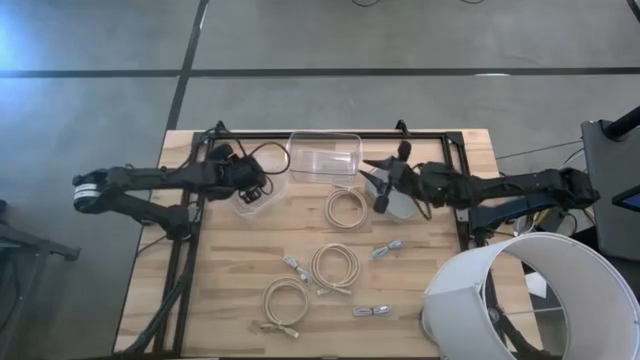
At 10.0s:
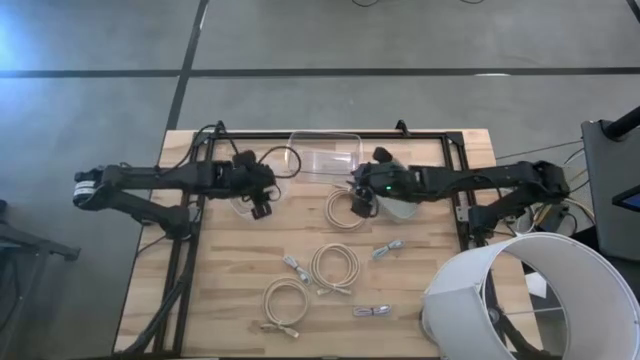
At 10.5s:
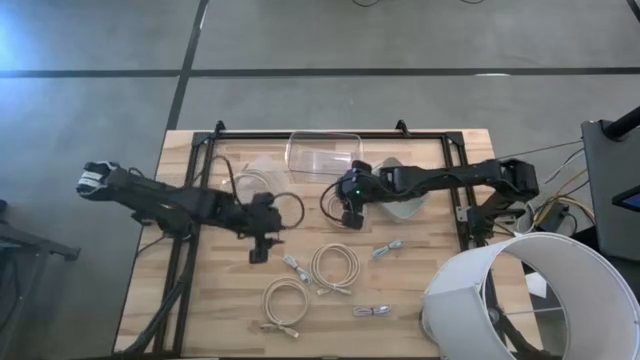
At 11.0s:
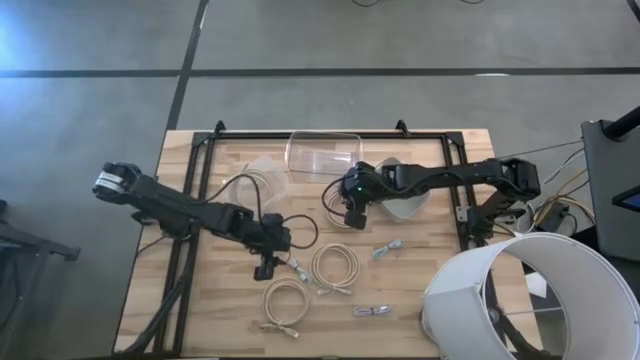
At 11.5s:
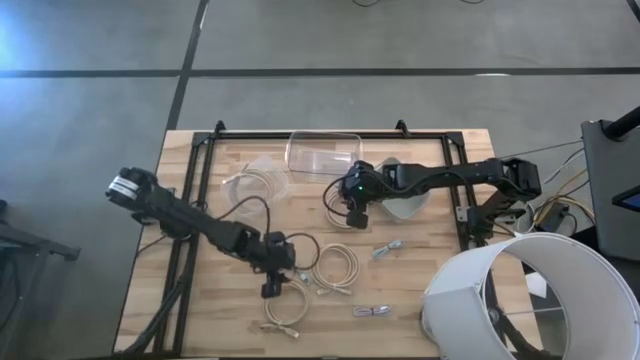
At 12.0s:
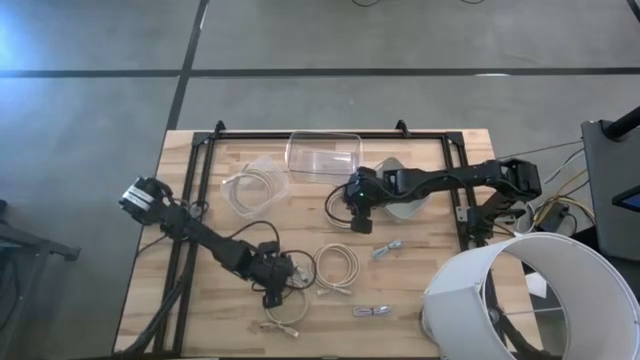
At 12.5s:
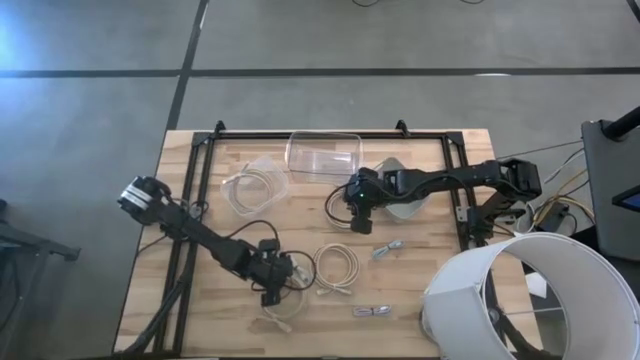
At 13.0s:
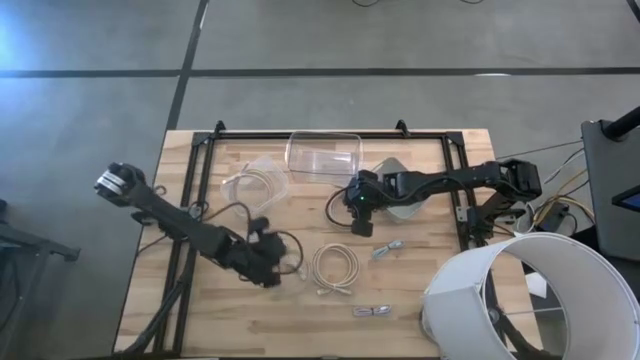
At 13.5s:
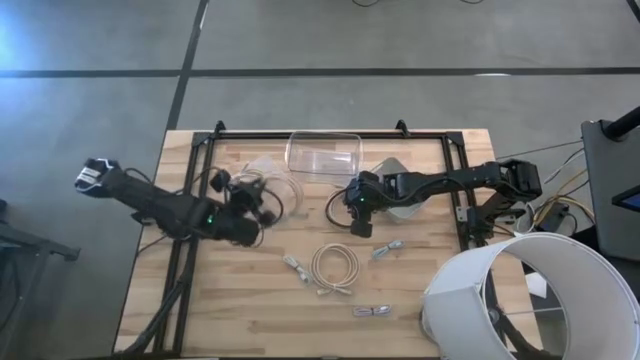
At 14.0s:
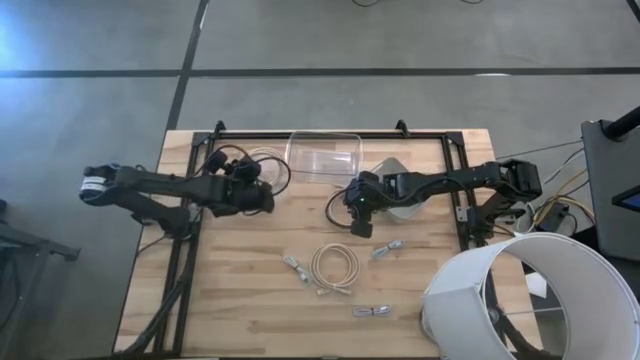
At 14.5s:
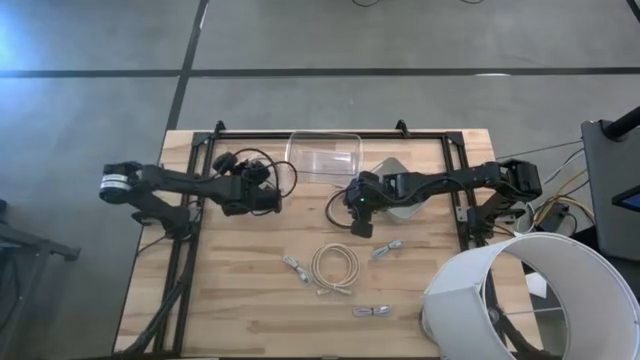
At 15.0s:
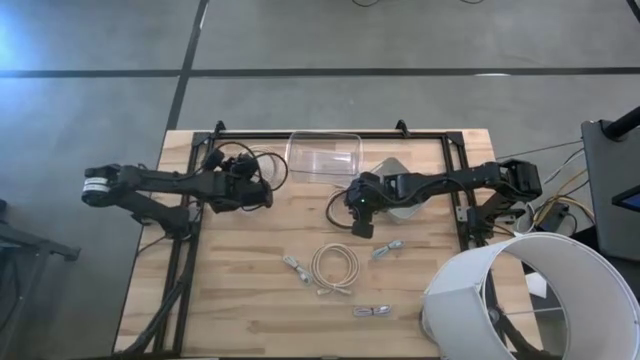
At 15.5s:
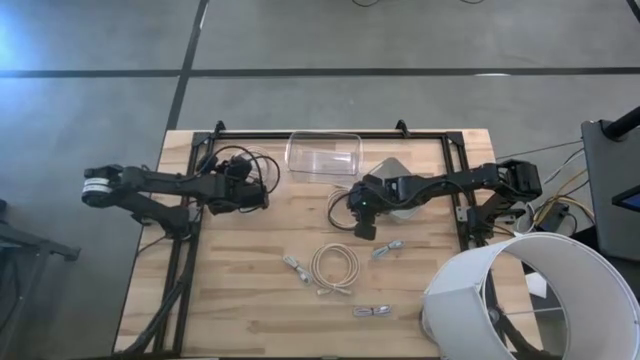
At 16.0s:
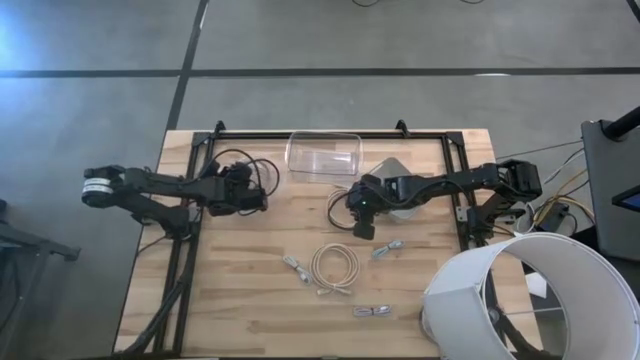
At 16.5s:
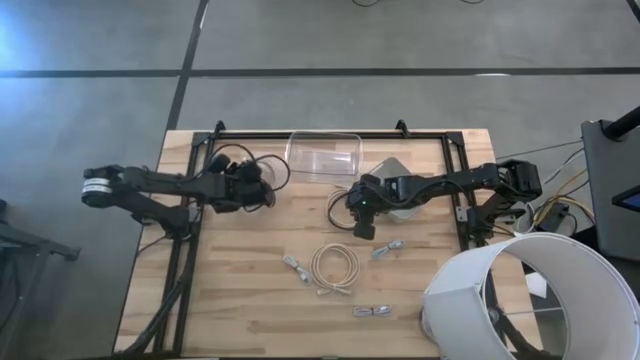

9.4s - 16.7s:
Task: Pick & Place USB Port
Put the brown HDMI cable into the left transparent bin

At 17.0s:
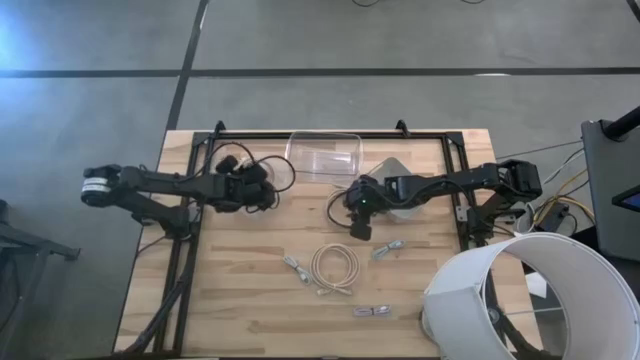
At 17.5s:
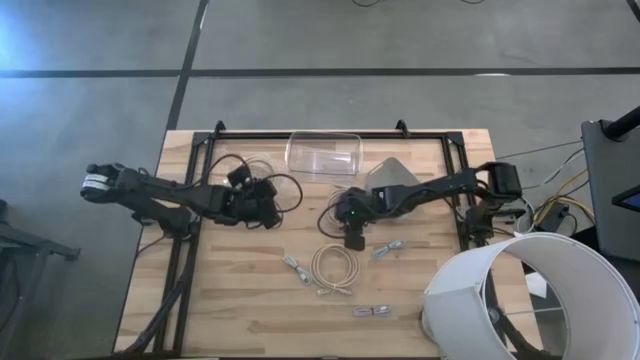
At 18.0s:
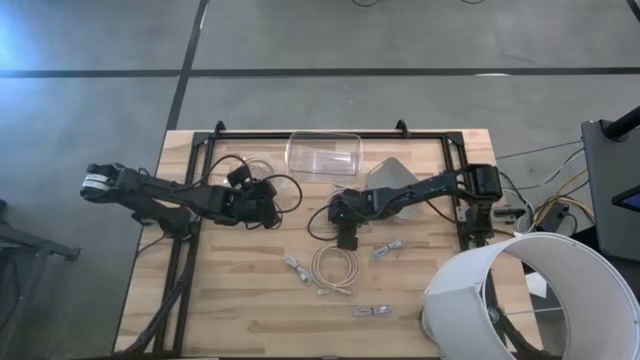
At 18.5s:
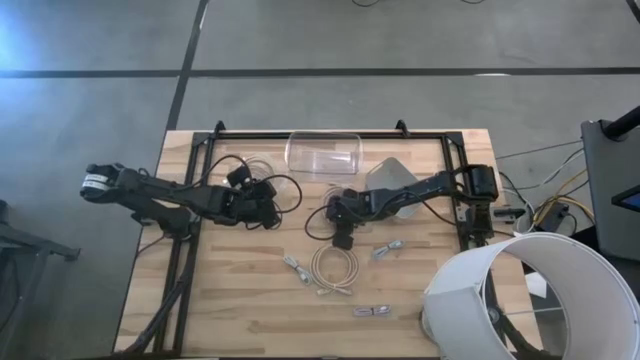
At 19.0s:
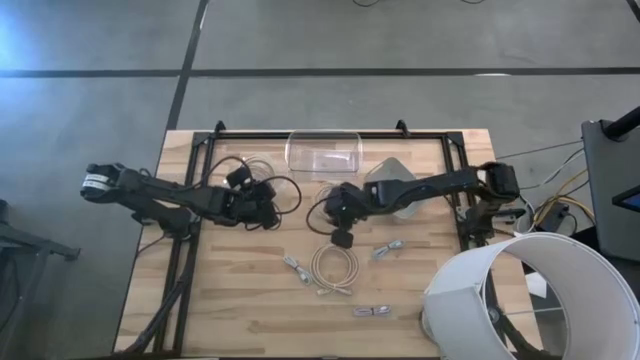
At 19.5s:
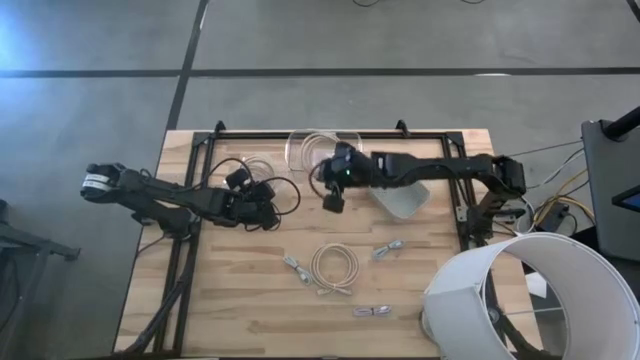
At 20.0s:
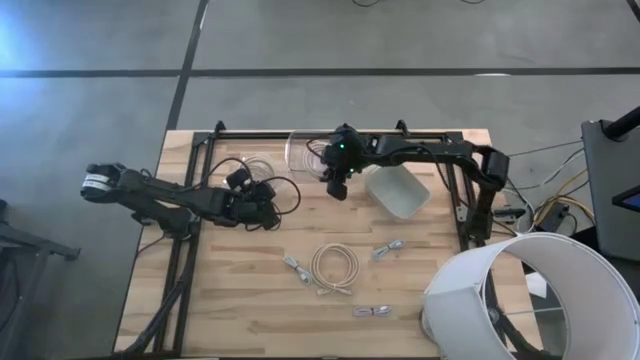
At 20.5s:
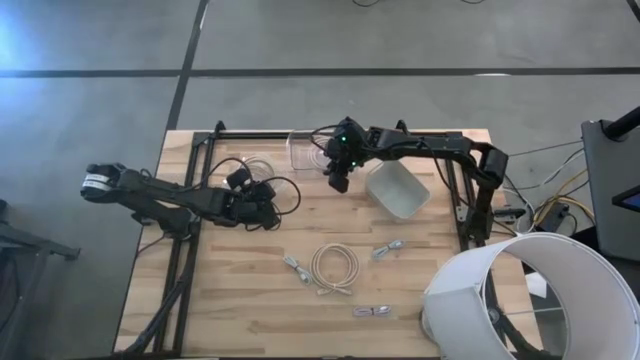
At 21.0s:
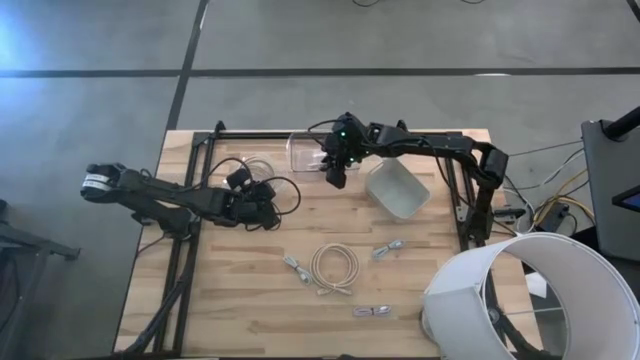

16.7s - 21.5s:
Put the brown HDMI cable into the right transparent bin

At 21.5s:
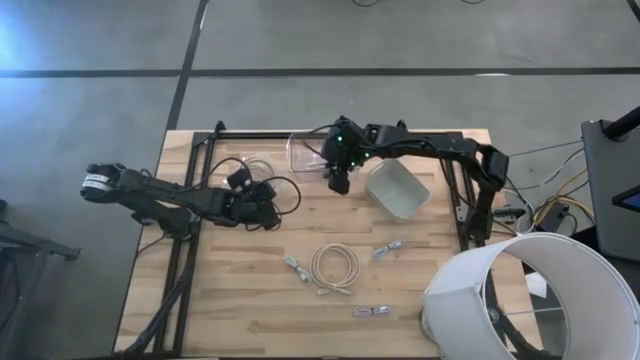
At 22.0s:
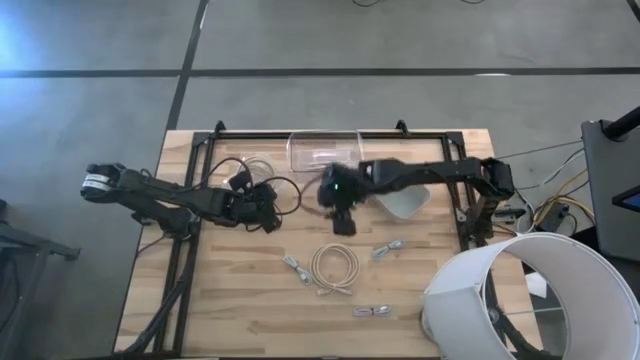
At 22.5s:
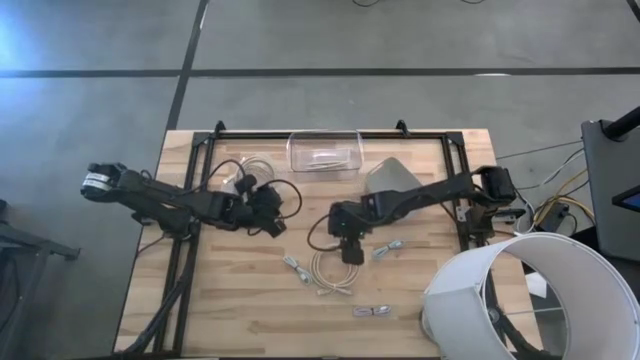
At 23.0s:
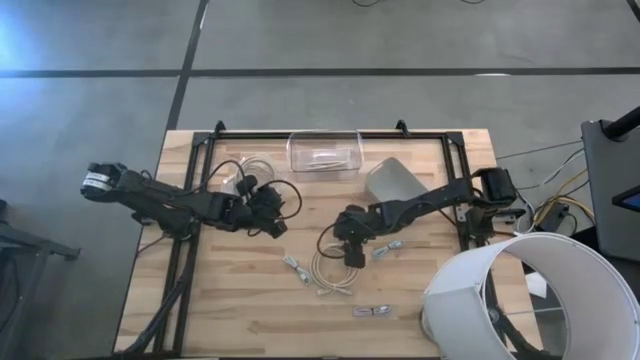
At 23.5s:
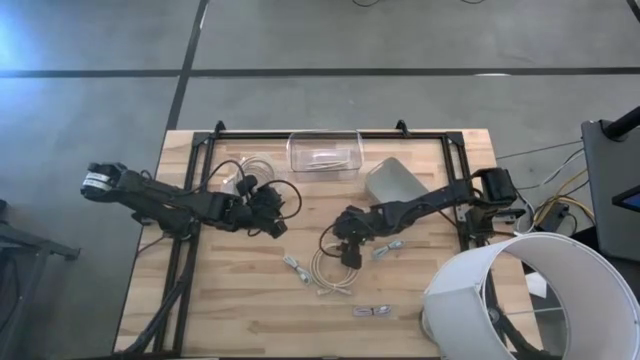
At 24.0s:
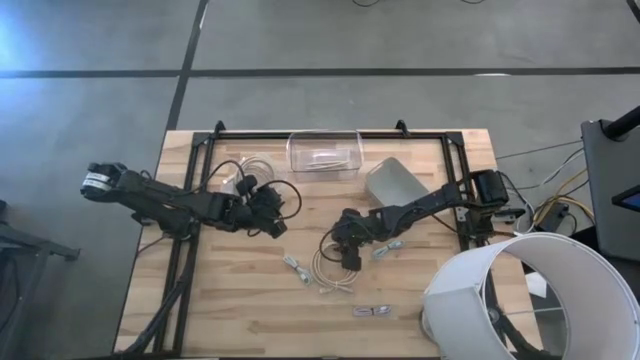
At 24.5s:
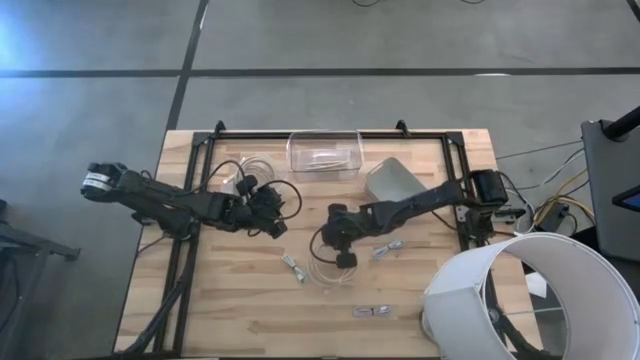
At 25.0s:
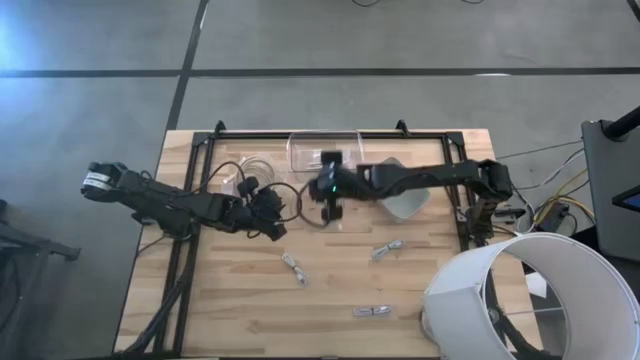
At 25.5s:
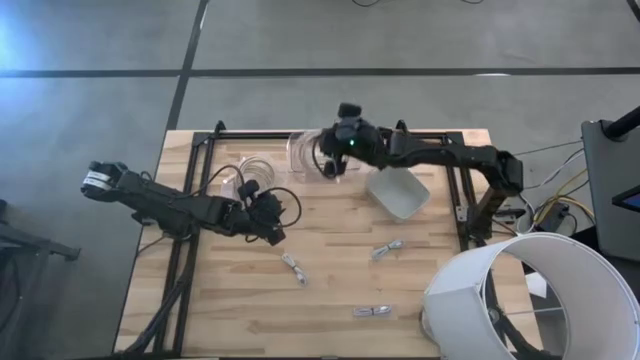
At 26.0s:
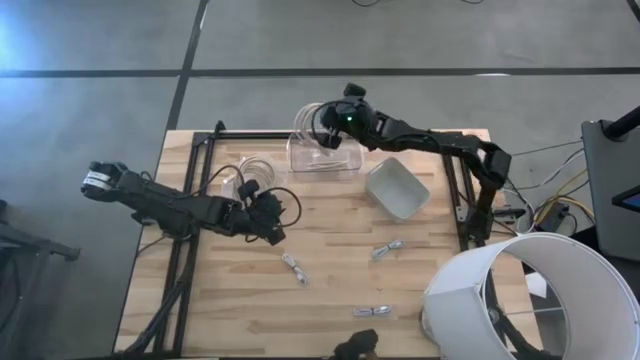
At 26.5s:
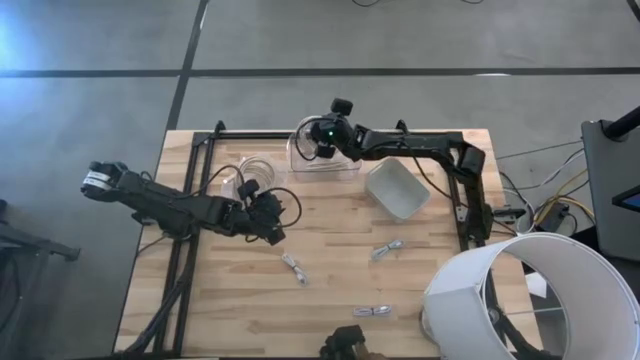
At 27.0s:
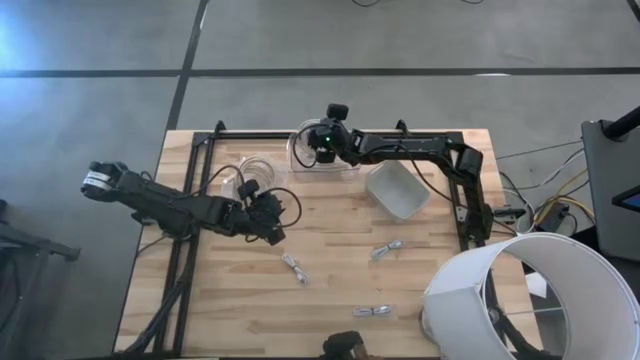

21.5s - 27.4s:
Put the brown HDMI cable into the right transparent bin

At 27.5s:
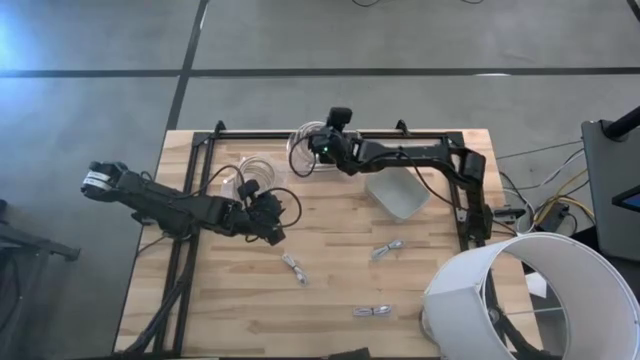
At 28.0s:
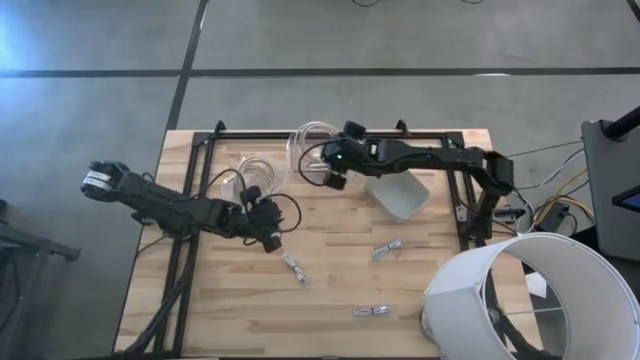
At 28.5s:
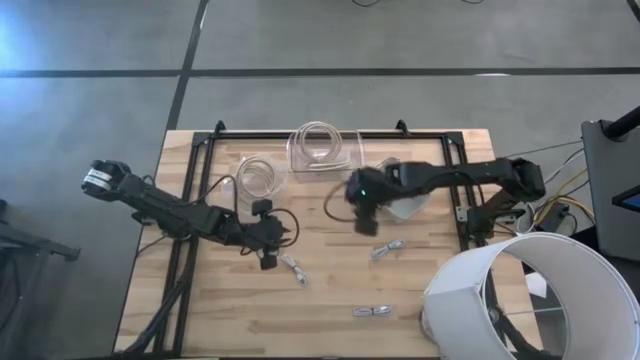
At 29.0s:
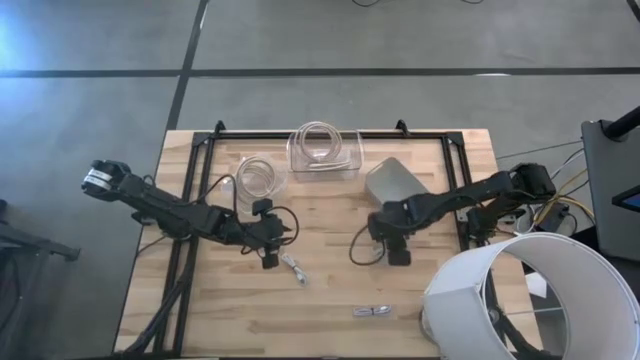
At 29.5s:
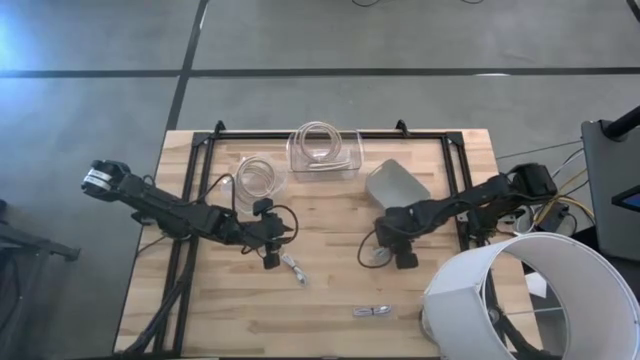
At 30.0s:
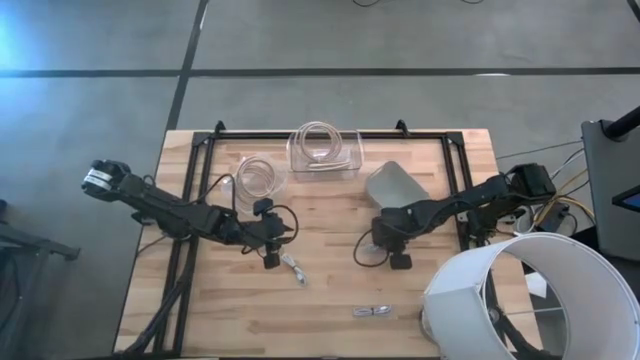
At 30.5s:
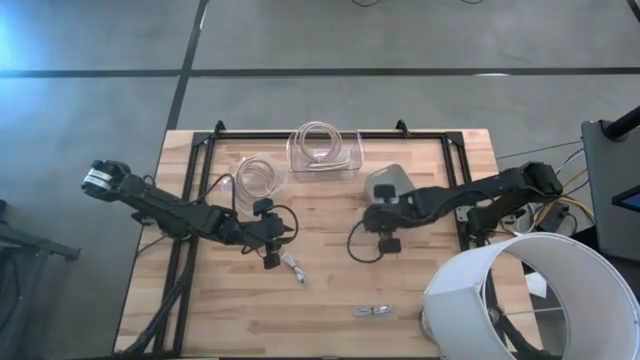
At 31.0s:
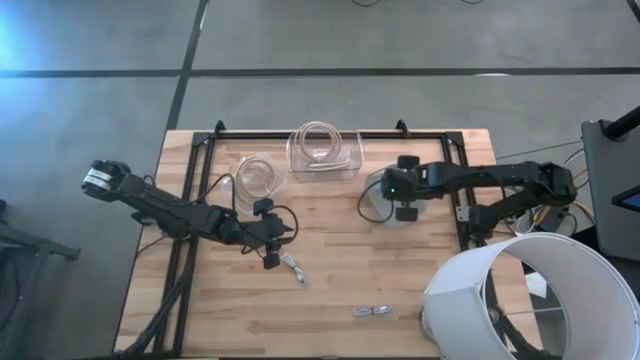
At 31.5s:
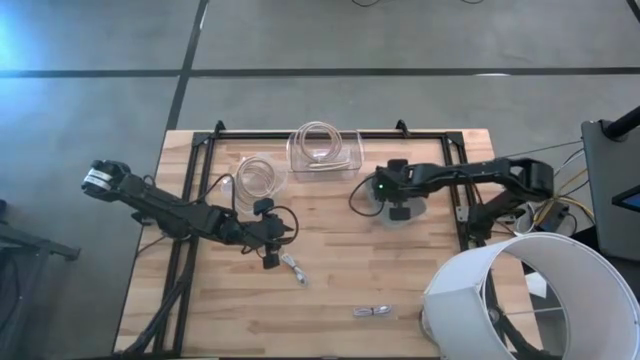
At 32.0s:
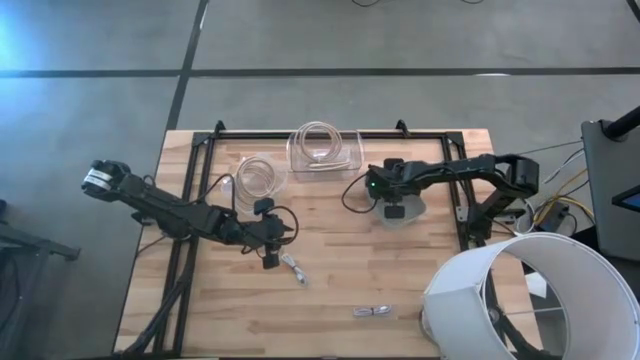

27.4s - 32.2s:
Put the blue USB cable into the gray bin
